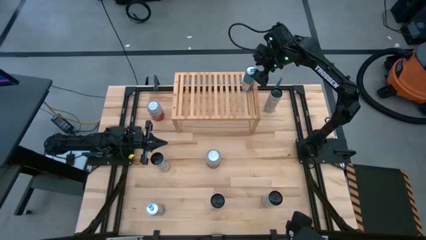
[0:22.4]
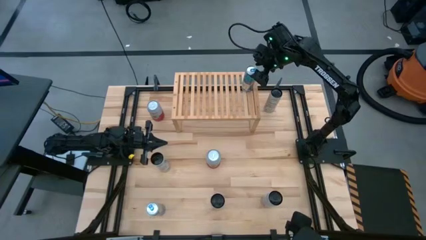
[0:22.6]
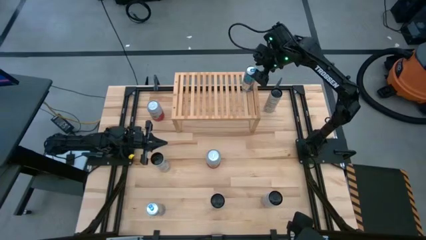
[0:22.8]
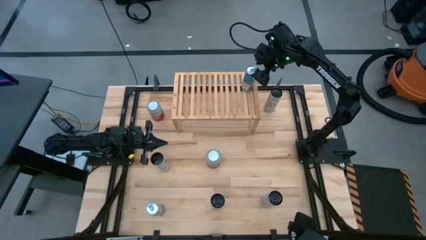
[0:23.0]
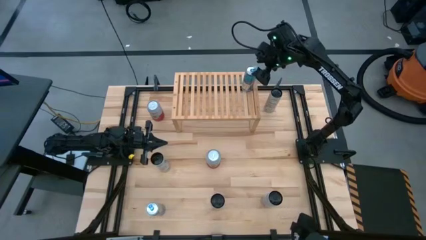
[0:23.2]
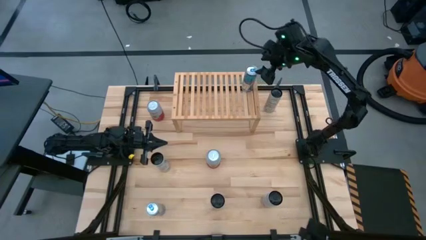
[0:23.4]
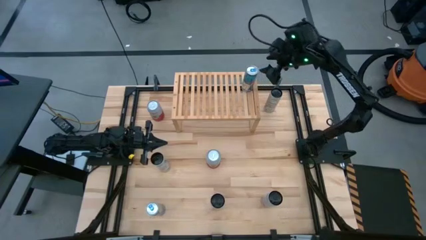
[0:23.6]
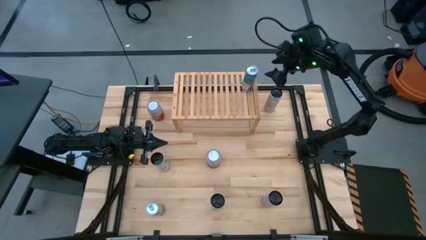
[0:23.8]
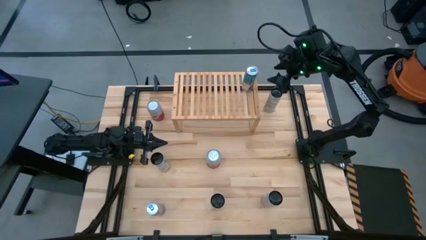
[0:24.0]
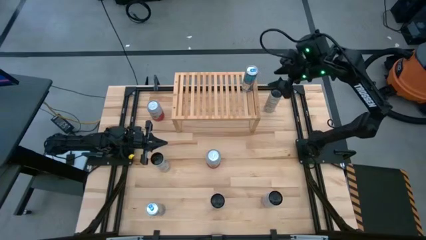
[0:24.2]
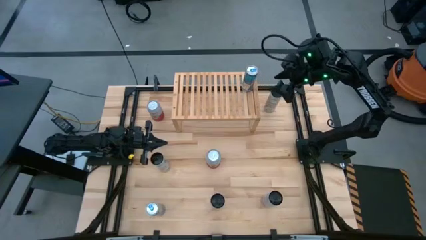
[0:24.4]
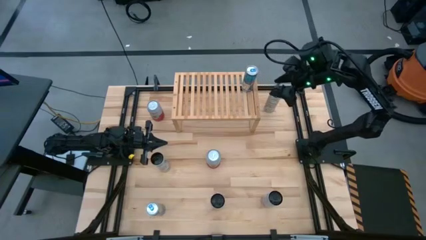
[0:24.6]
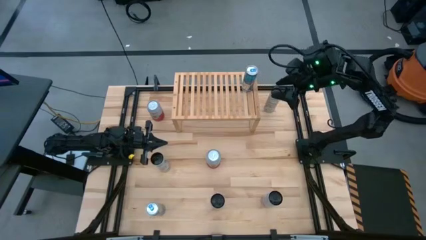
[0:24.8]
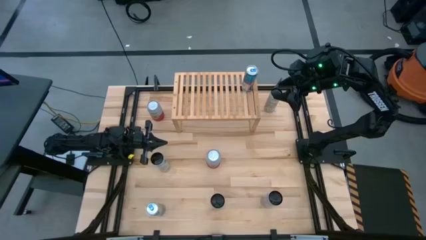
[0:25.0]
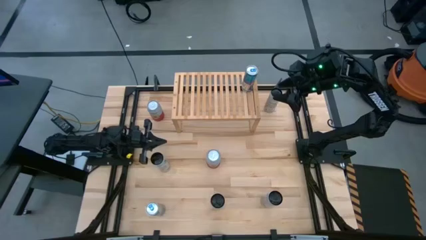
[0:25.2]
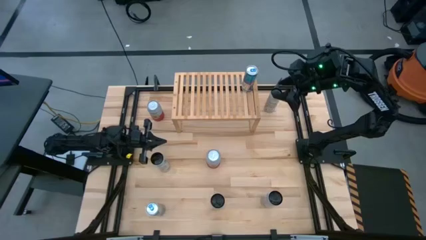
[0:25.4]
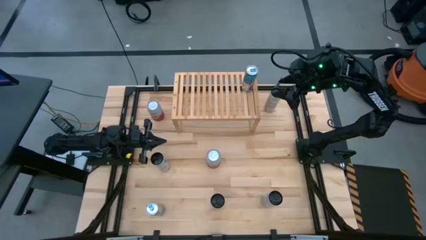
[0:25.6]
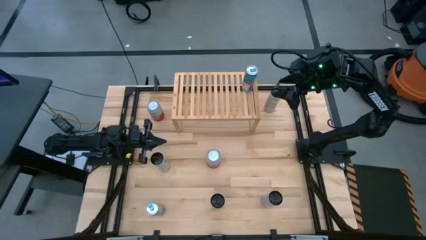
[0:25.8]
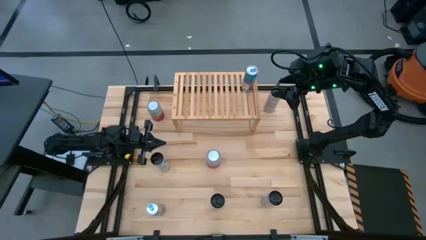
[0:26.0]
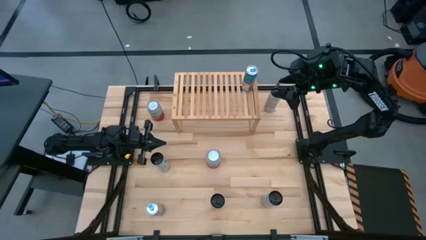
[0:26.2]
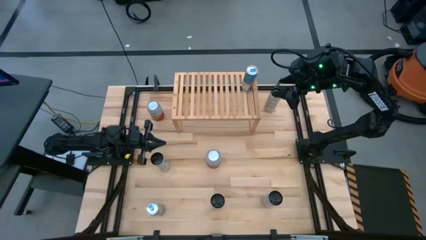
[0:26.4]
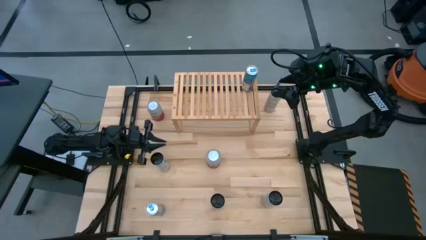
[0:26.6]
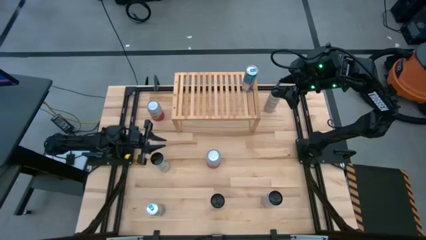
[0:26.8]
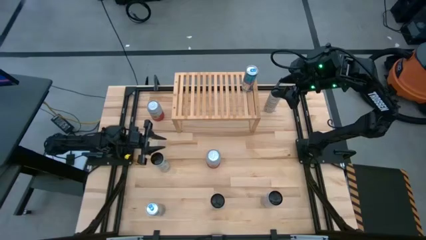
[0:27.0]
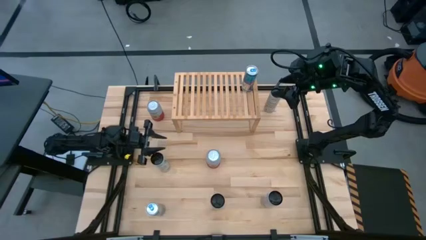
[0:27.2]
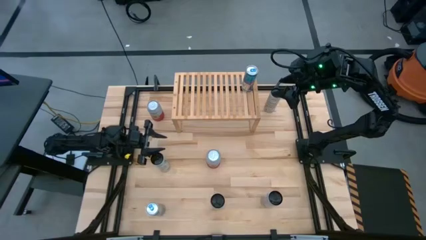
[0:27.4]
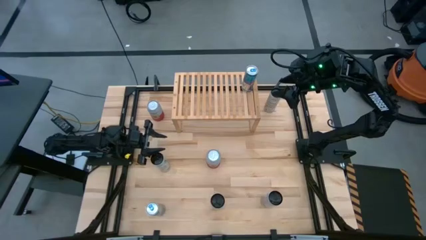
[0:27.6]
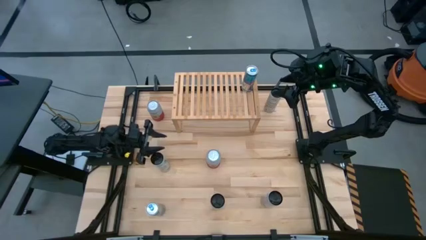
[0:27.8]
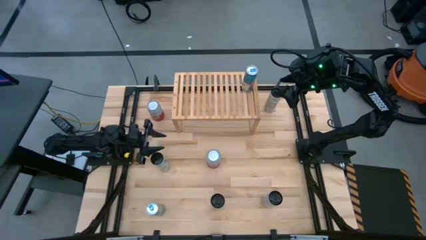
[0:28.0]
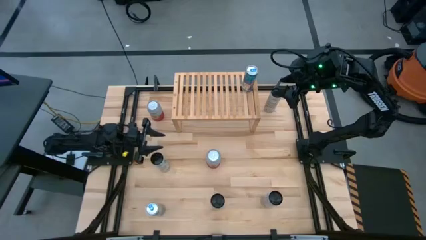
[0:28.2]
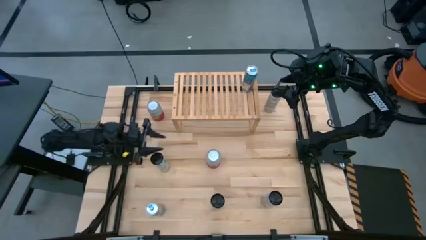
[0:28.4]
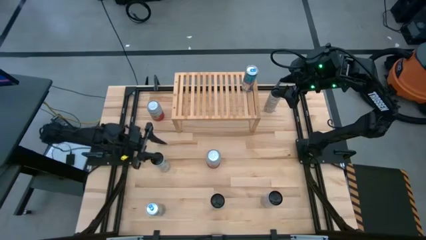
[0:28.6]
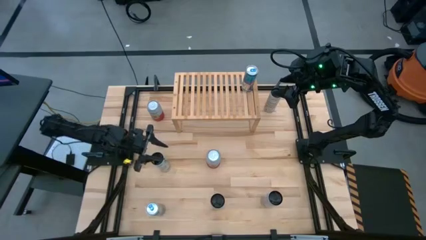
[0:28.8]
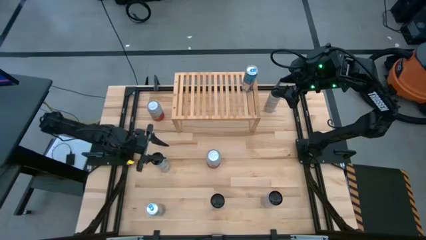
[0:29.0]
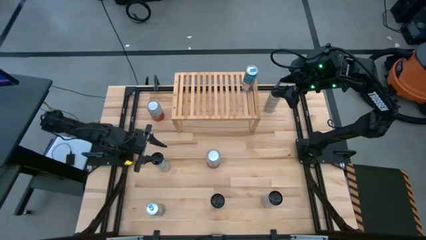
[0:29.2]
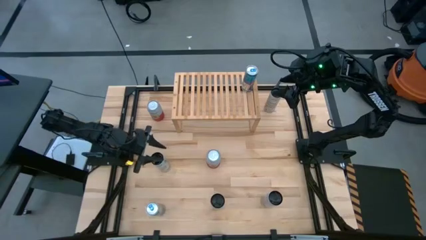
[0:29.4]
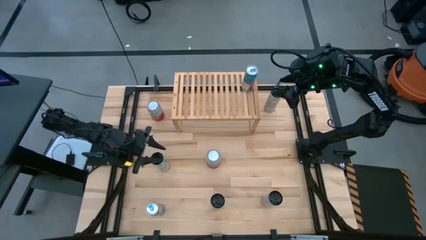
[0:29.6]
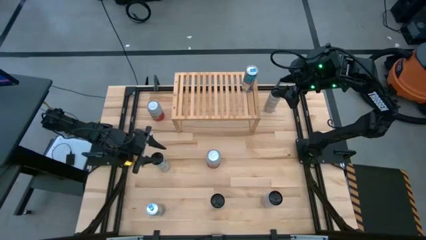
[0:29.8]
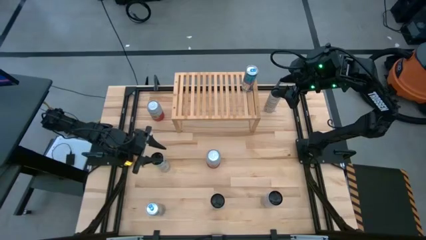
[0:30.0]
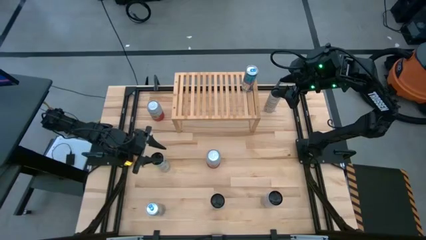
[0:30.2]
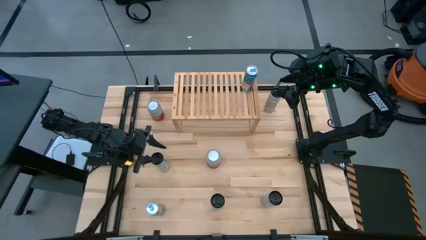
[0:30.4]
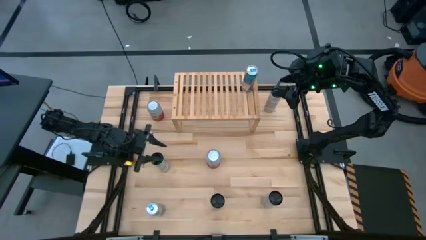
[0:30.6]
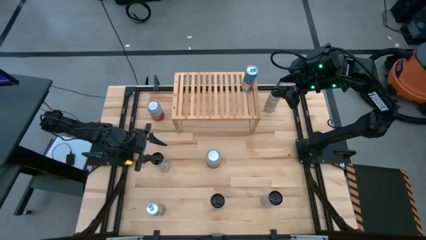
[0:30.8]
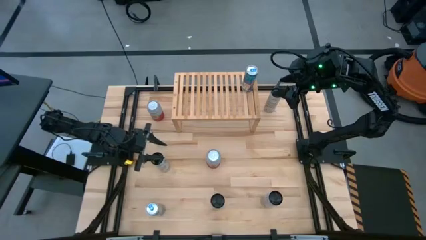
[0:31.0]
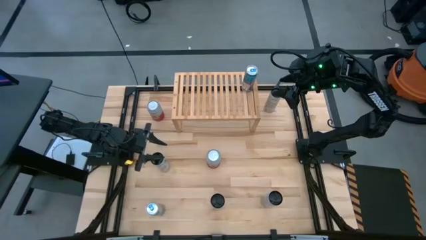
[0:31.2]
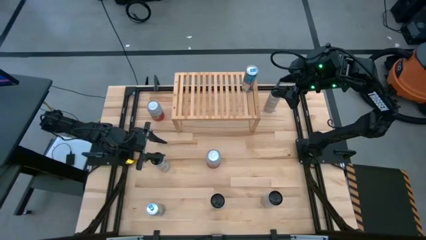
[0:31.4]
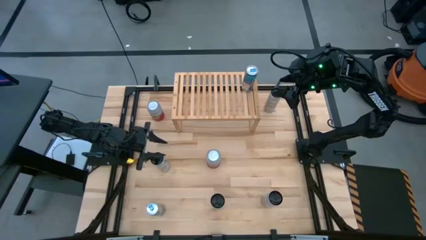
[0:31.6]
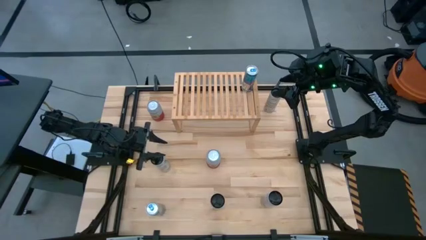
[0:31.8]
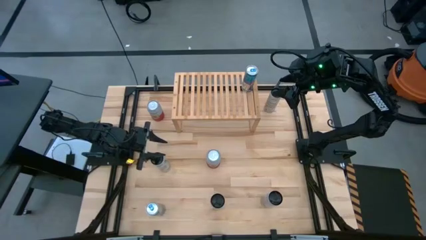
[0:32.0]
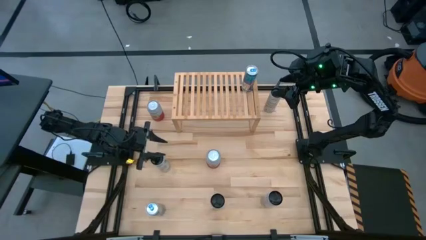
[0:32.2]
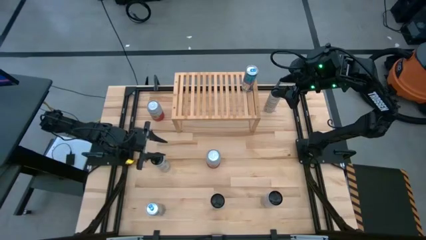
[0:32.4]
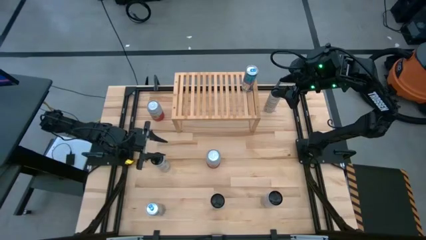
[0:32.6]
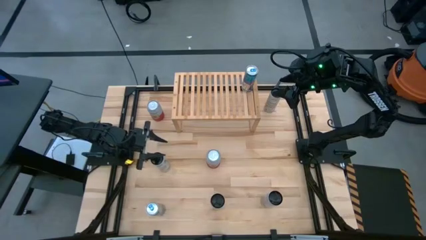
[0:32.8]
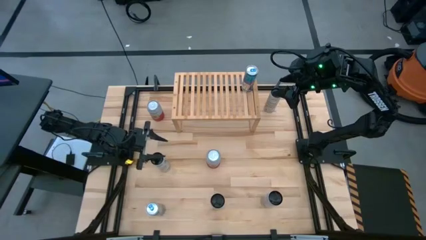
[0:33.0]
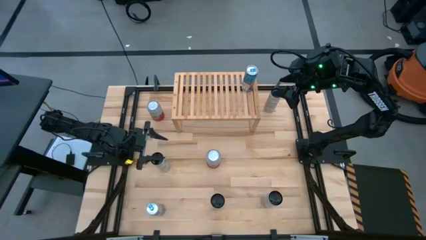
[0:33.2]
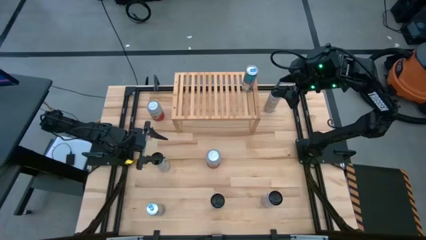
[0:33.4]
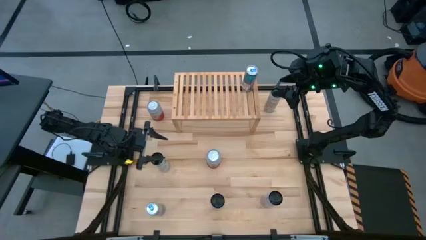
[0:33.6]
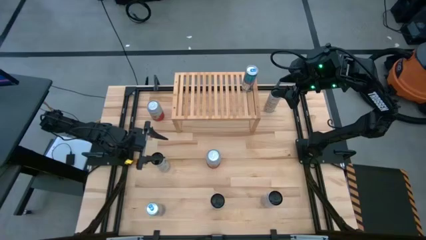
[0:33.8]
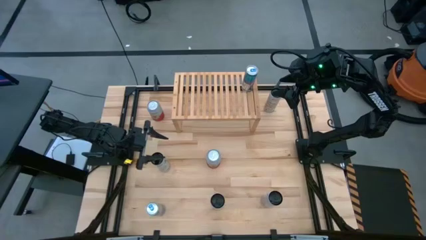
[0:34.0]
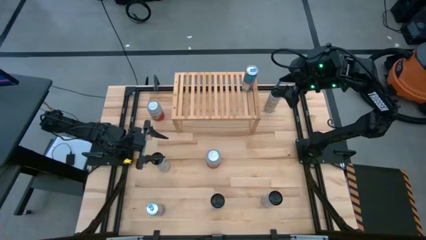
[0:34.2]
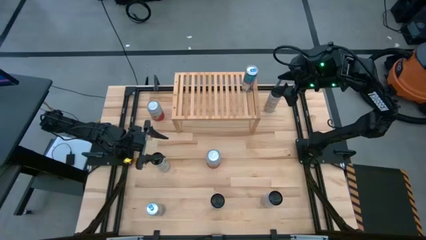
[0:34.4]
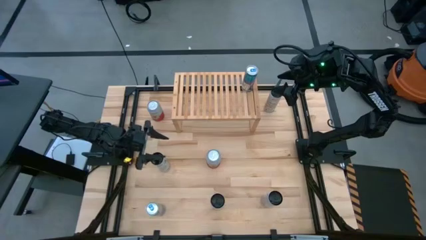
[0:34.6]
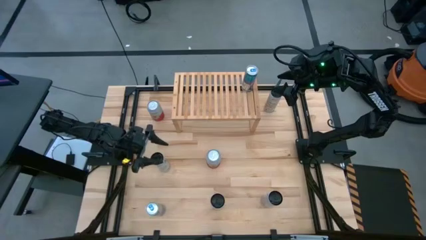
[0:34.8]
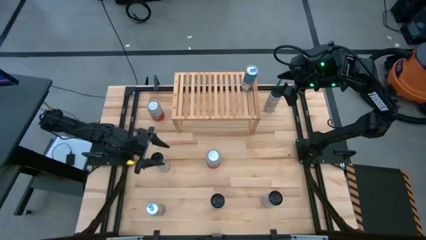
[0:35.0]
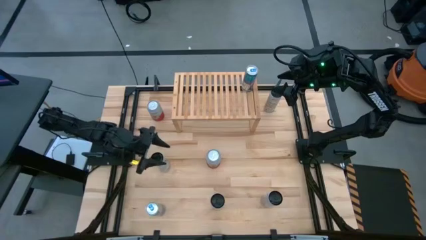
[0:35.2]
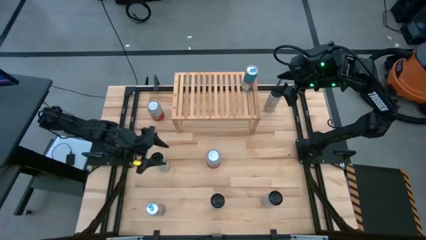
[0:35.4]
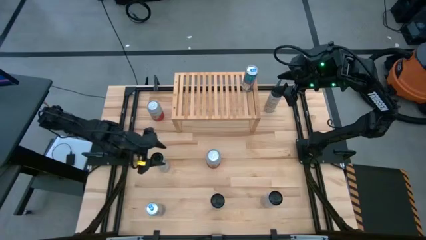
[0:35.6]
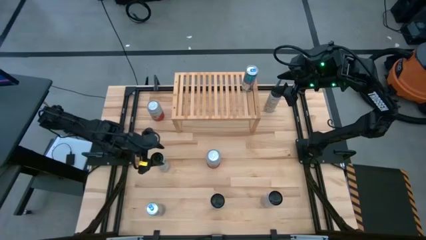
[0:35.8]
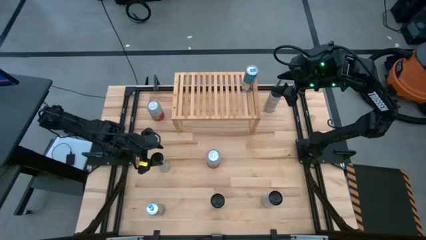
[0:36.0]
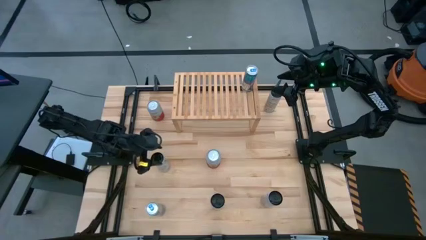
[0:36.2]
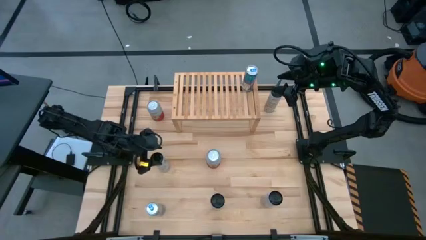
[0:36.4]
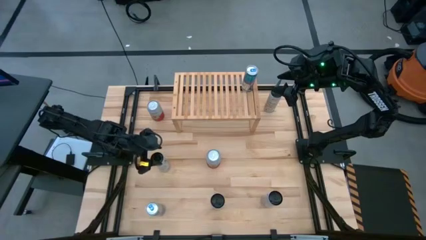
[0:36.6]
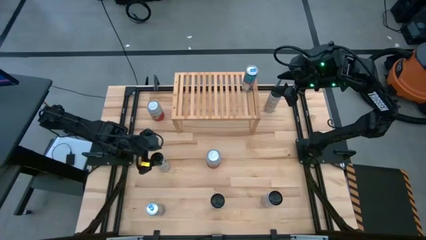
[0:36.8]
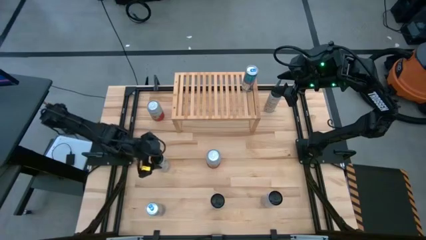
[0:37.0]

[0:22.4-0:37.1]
Task: Place canned beverage on shelf
Put the left white pink soda can on the shelf
